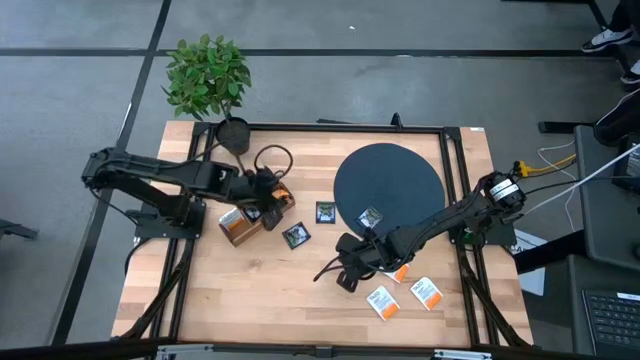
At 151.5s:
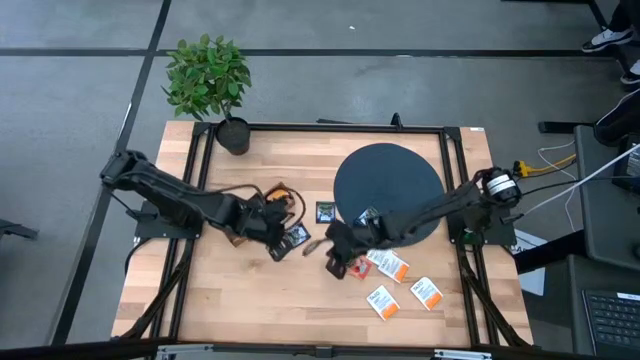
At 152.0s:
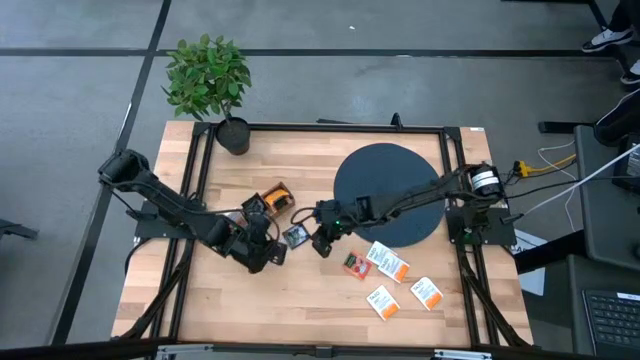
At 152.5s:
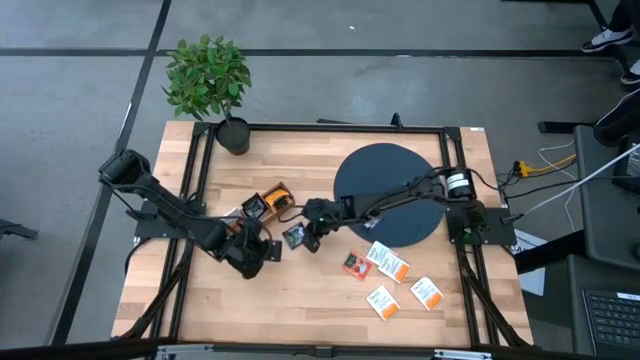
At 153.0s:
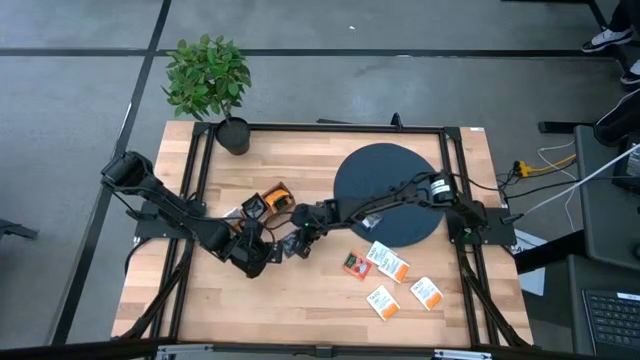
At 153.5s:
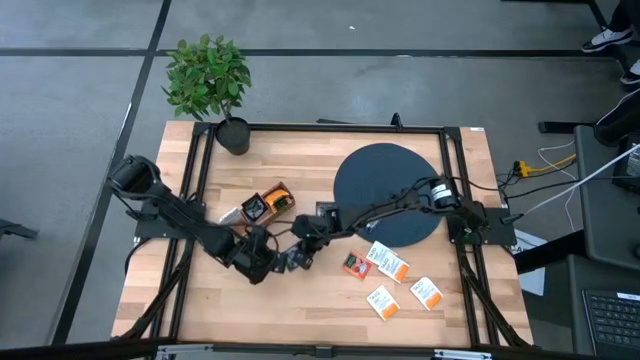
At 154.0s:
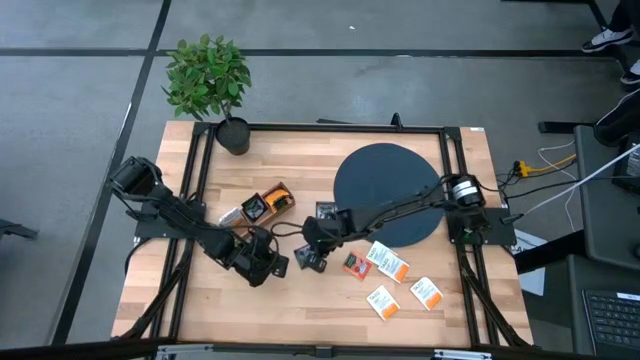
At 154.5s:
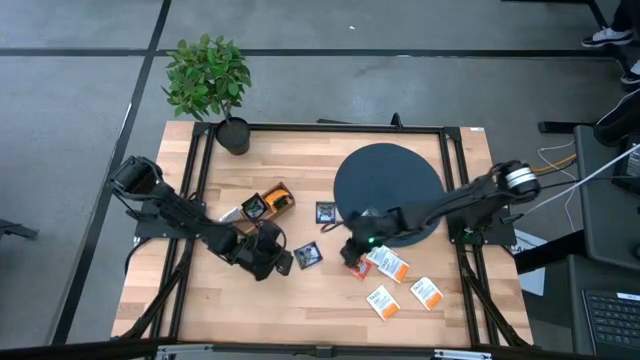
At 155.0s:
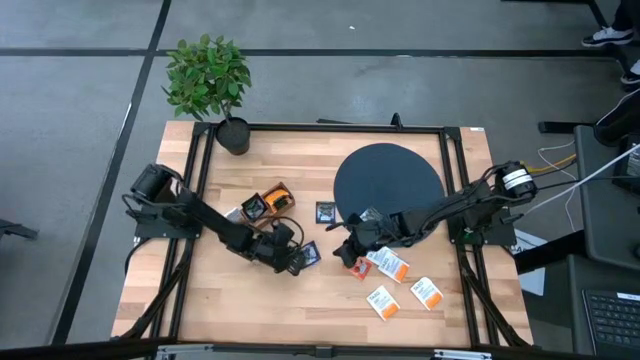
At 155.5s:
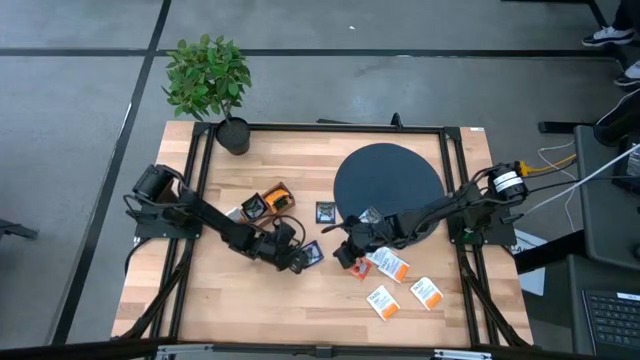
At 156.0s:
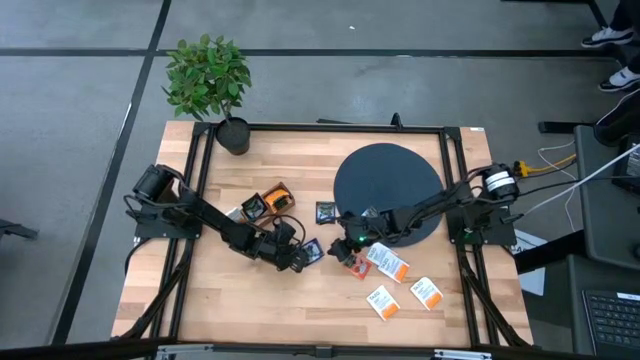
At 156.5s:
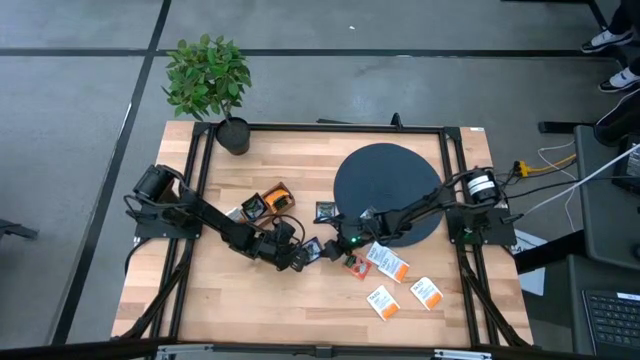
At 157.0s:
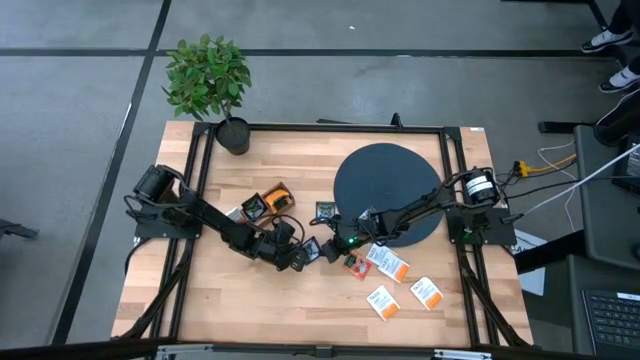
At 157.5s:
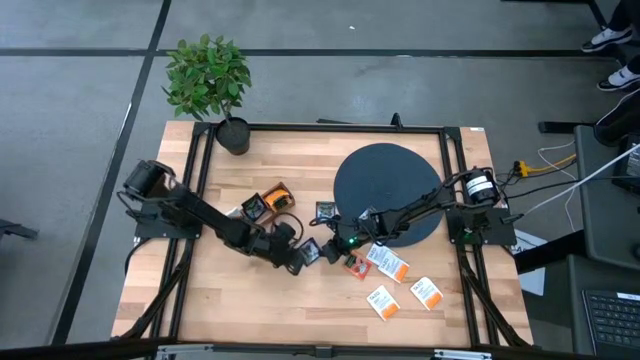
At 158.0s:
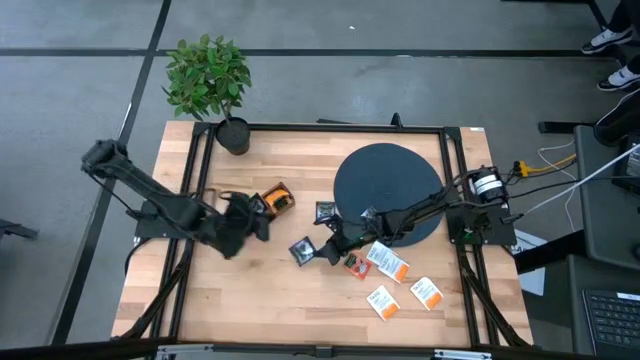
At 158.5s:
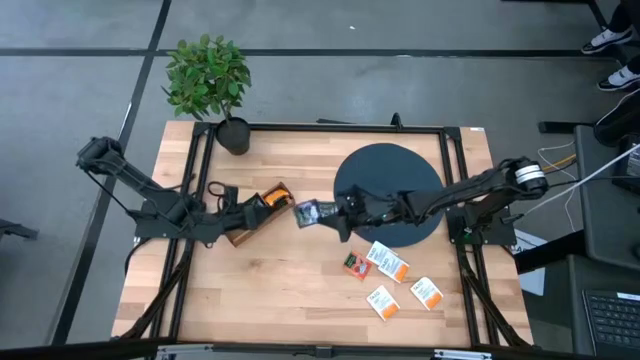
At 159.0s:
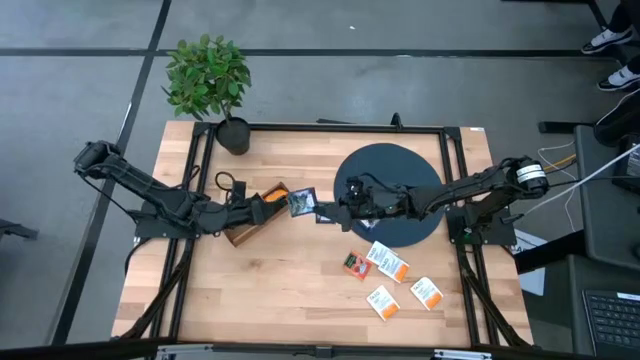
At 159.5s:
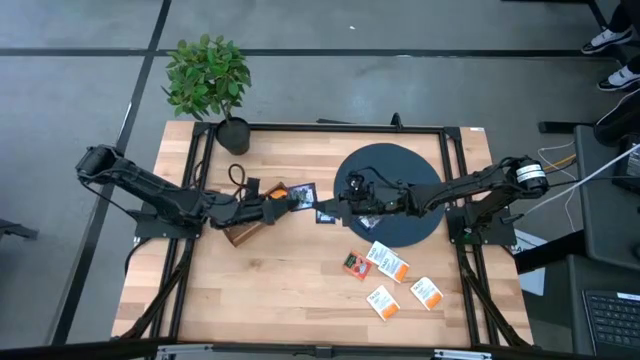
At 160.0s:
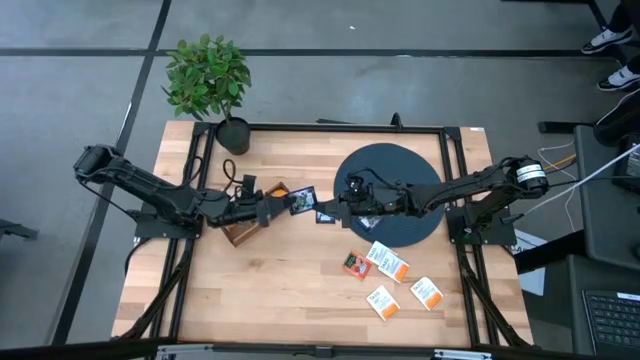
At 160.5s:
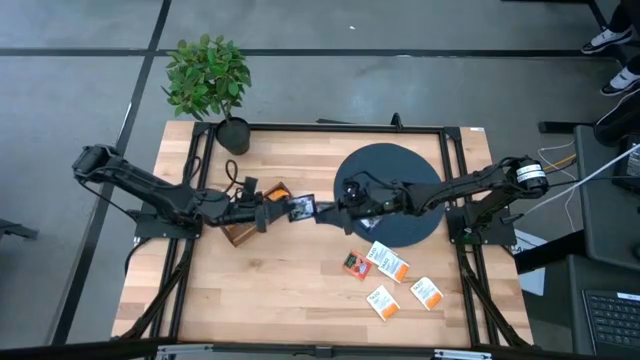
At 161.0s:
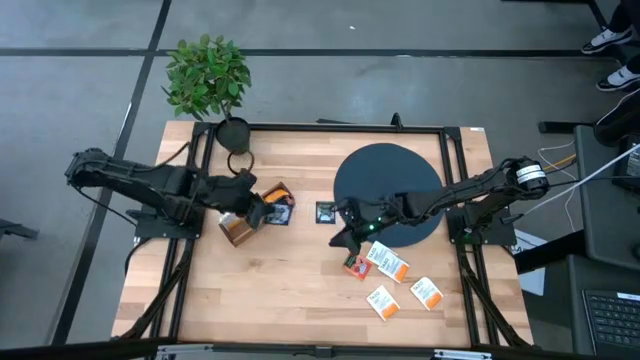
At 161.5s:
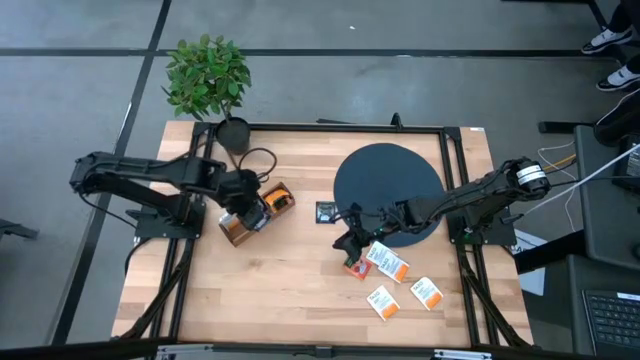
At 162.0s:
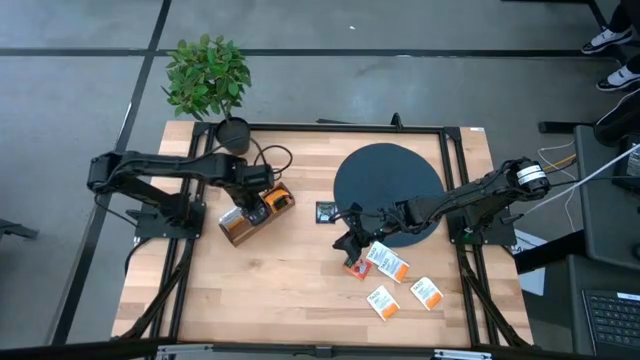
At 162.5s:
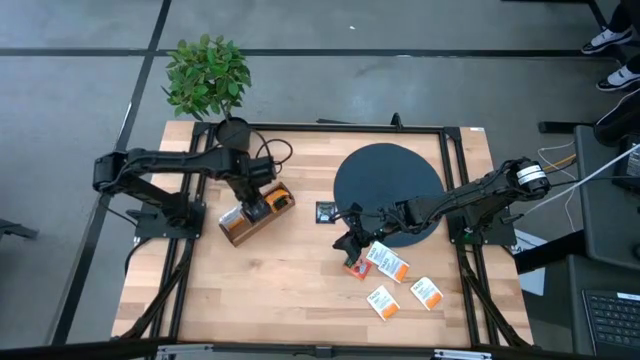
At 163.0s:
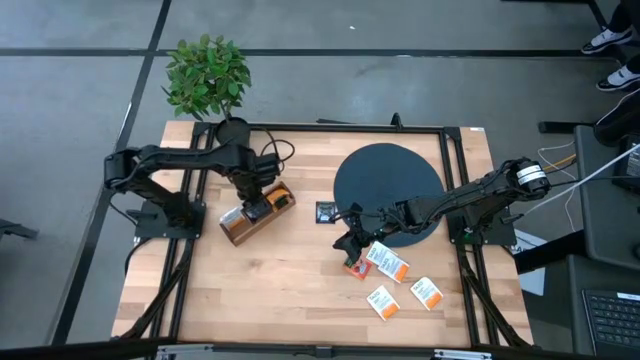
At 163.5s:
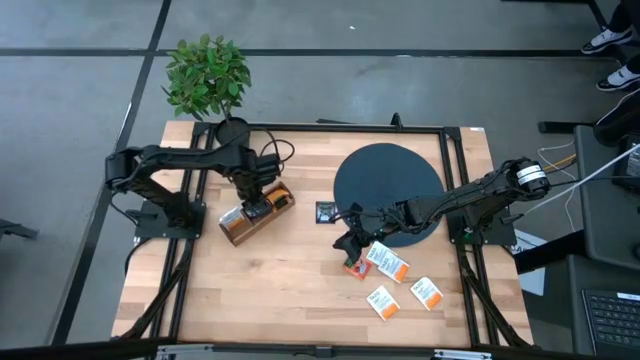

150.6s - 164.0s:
Task: Pick & Place Tea
Put the black tea bag into the middle section of the wooden organizer

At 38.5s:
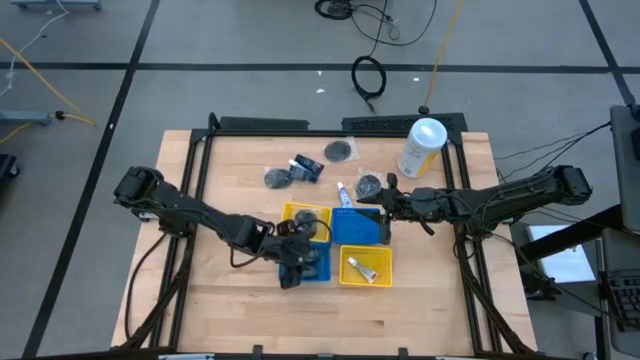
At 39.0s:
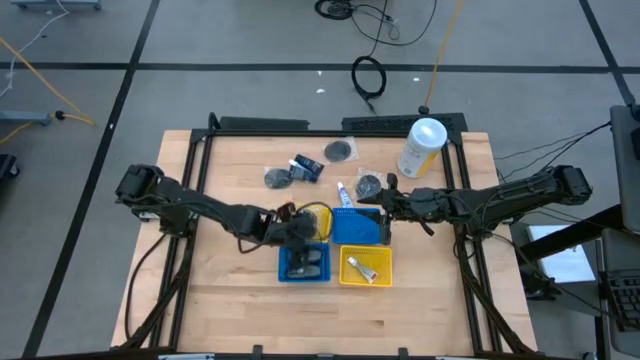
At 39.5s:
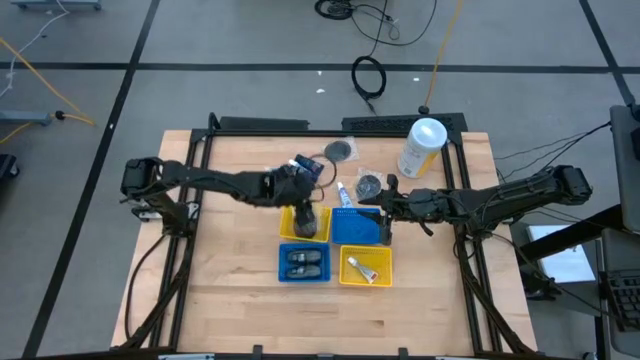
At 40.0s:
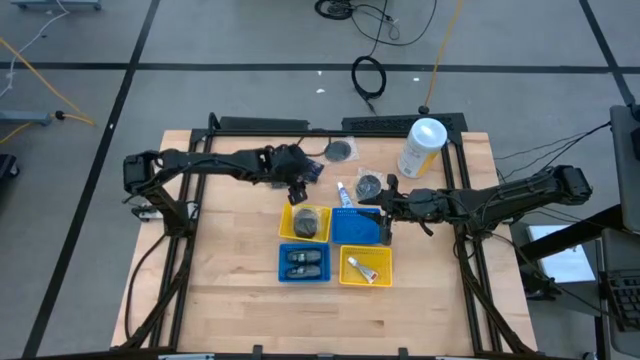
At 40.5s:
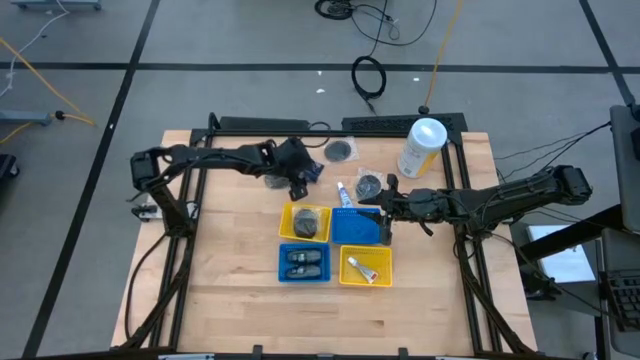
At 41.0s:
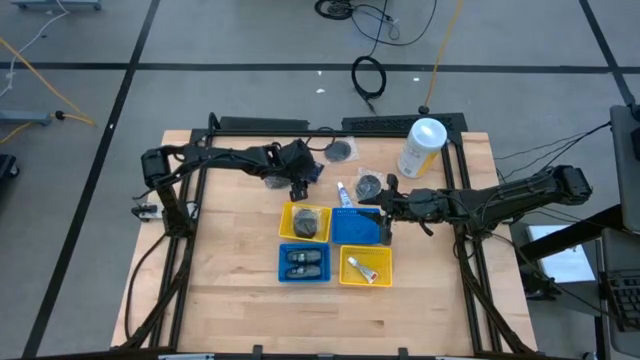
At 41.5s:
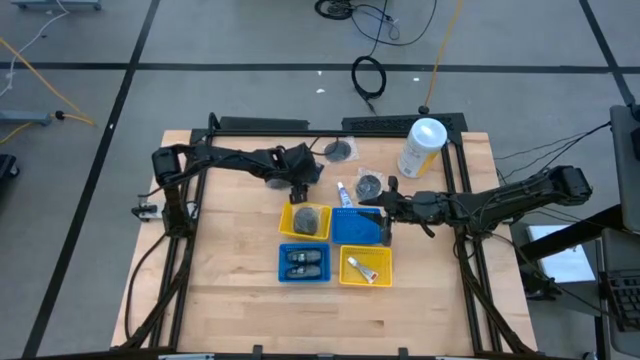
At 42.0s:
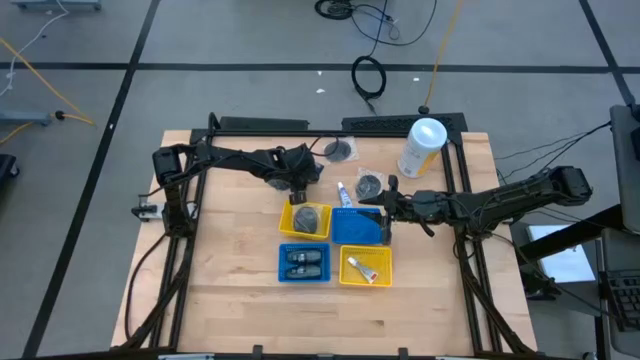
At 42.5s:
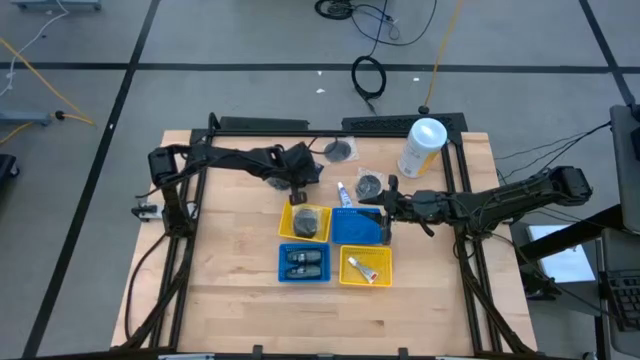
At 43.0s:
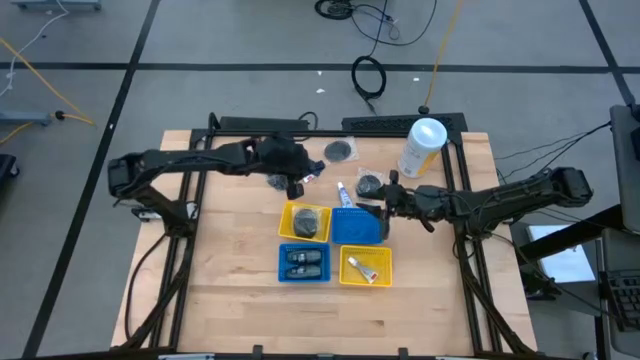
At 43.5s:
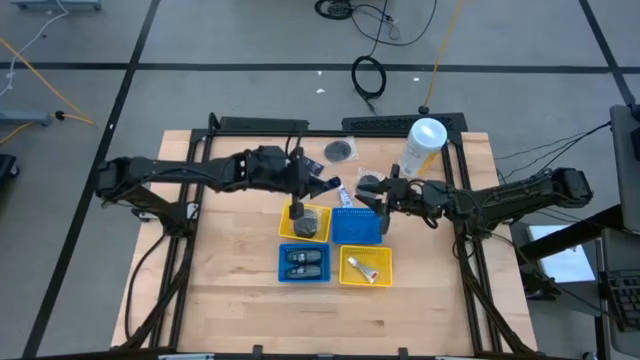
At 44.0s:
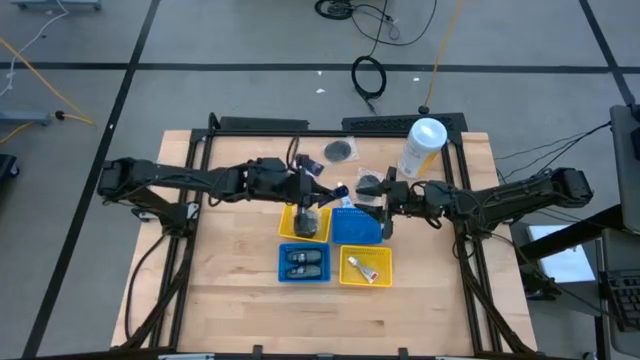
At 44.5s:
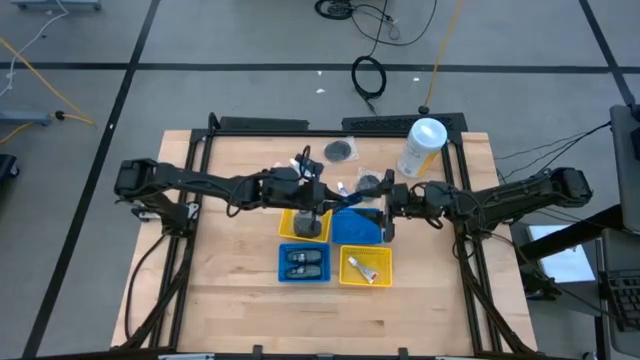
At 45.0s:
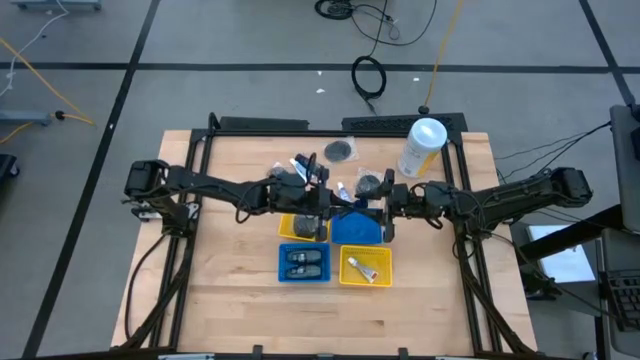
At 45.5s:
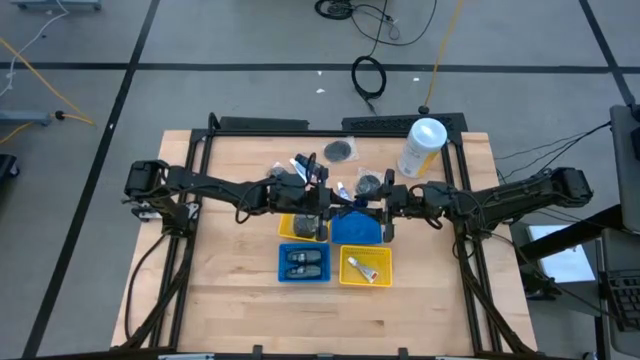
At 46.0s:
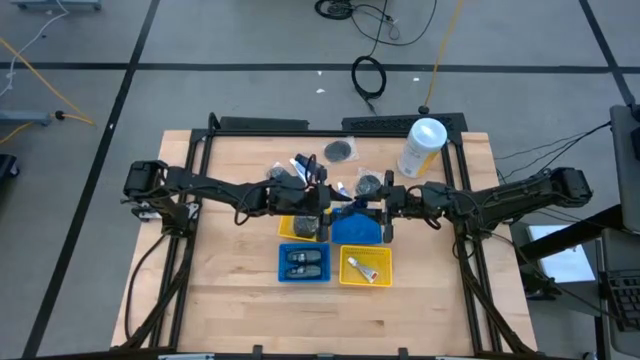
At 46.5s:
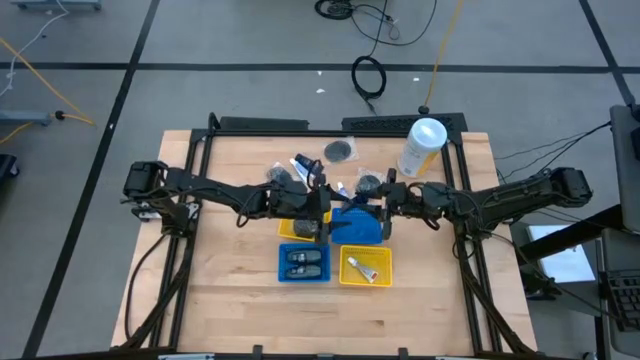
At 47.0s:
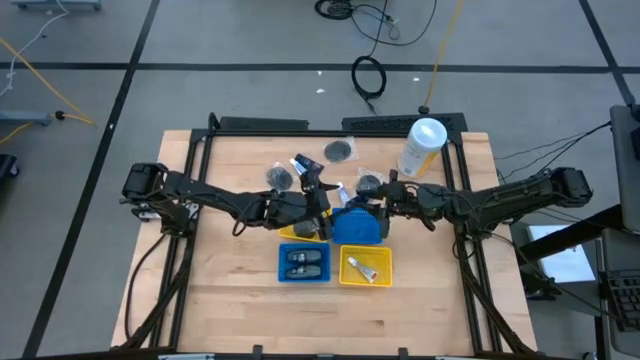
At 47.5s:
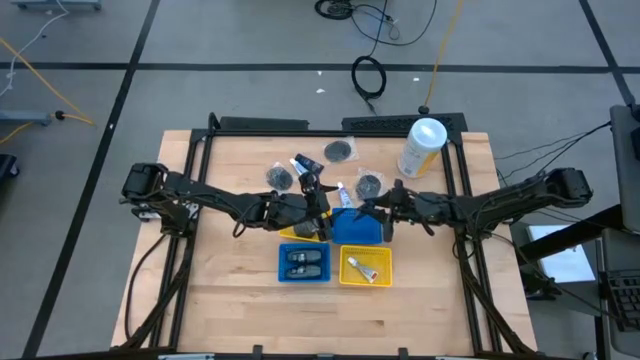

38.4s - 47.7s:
Task: Pick & Place Travel size toiletries
Put the blue shave cream into the top blue basket

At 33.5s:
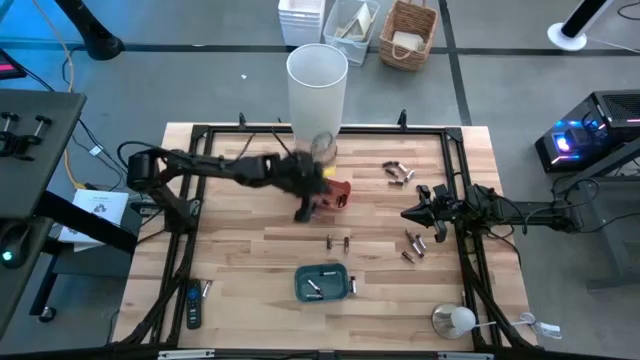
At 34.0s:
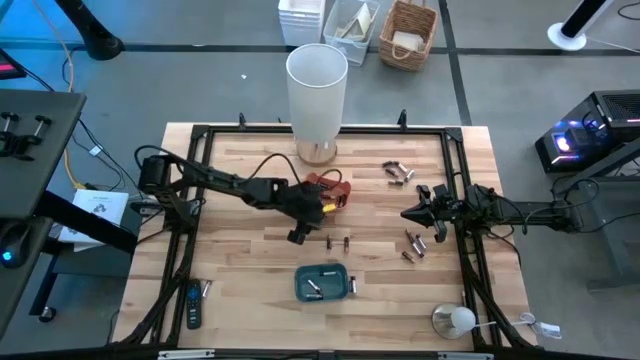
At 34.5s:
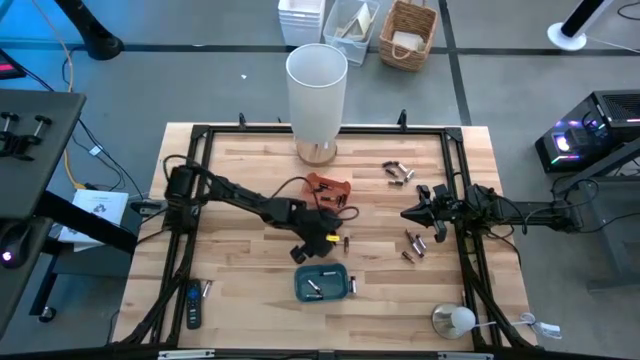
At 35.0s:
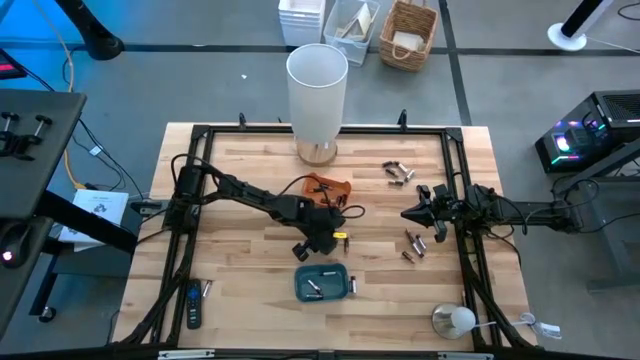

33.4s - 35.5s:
Task: Sort batteries
Put the black battery into the orange bin
